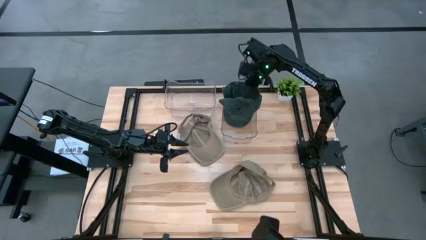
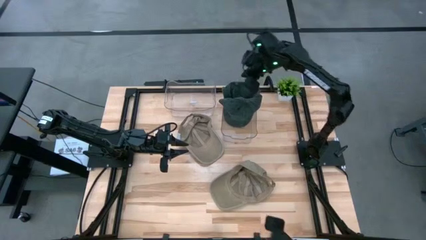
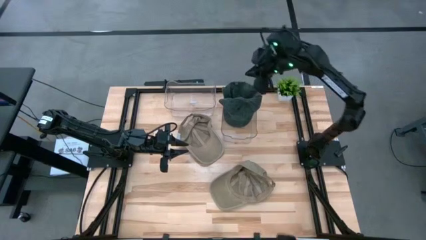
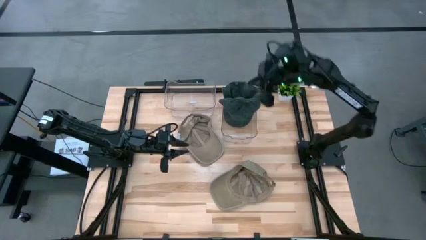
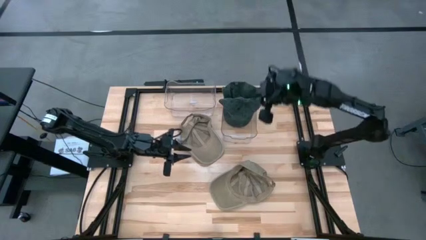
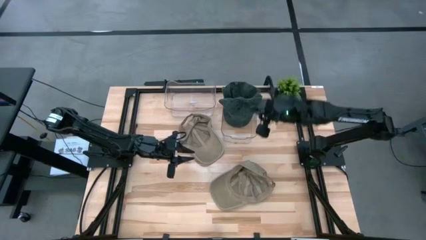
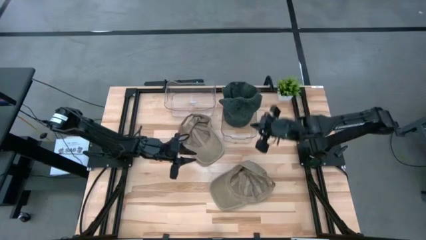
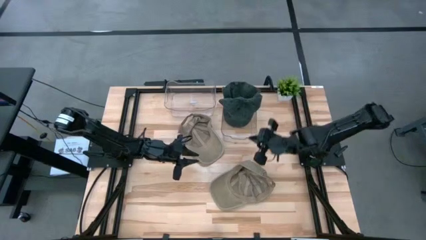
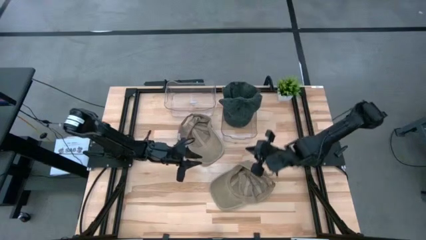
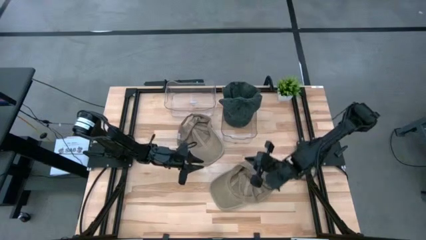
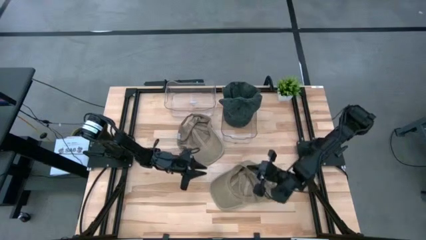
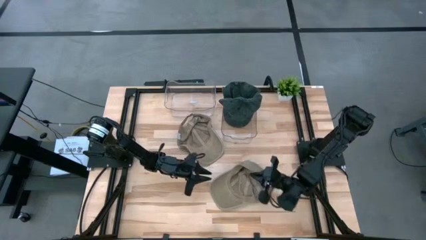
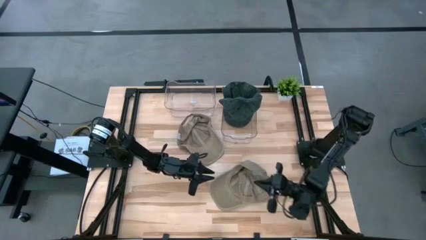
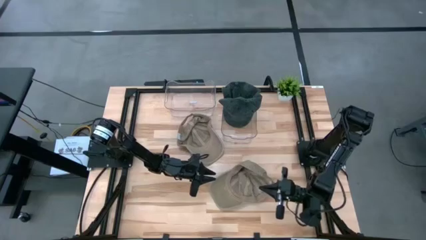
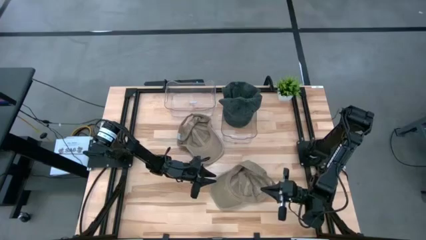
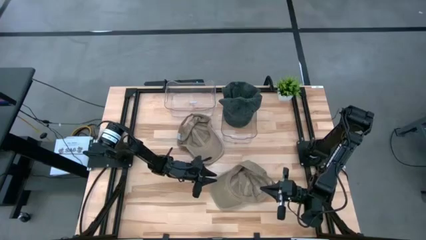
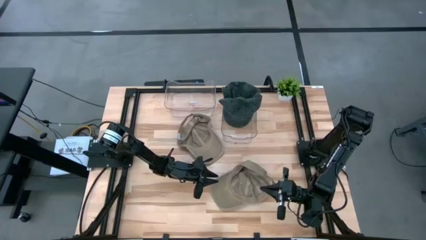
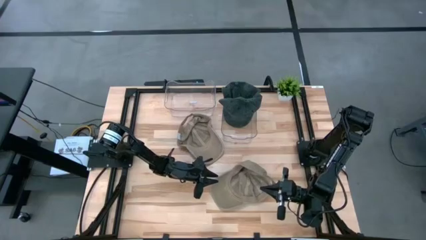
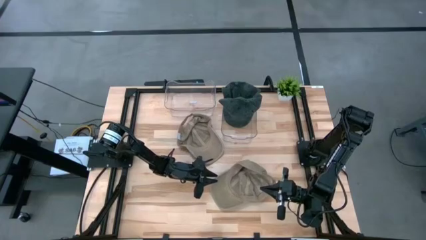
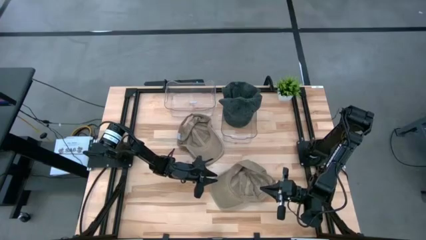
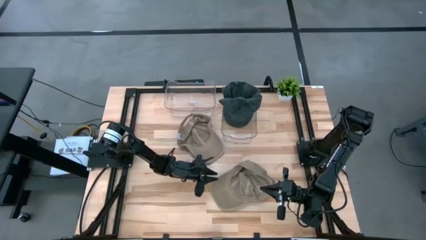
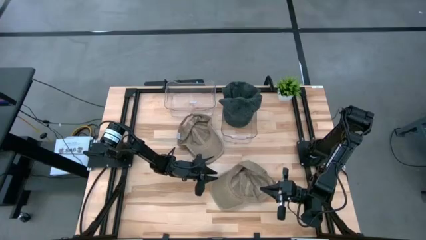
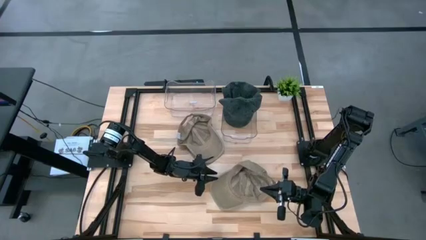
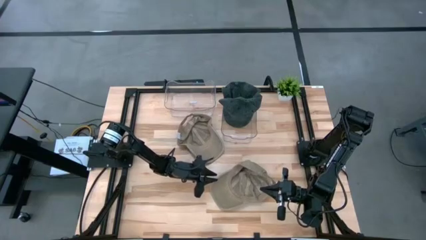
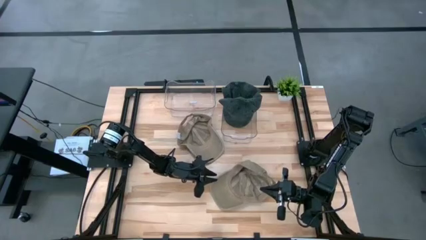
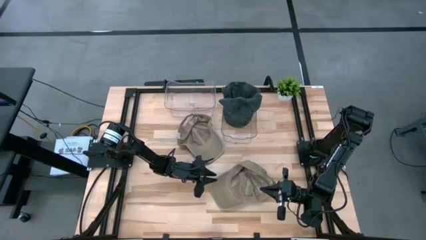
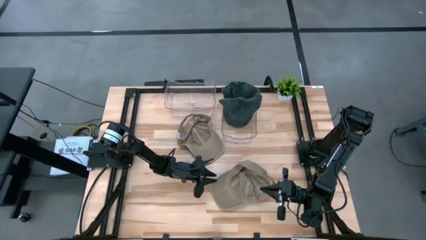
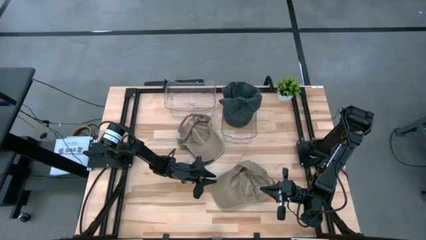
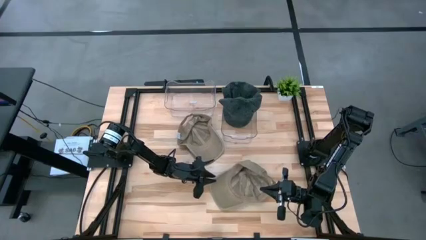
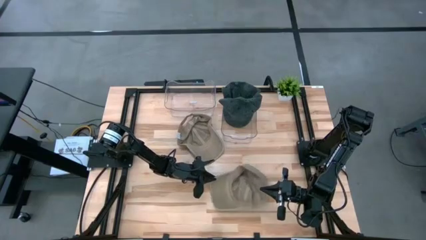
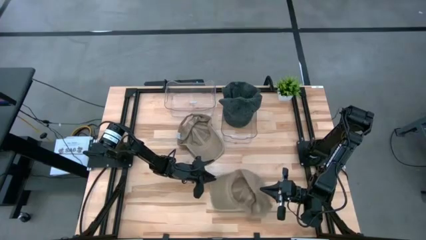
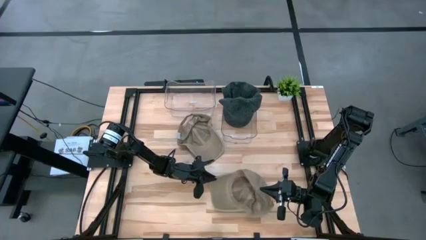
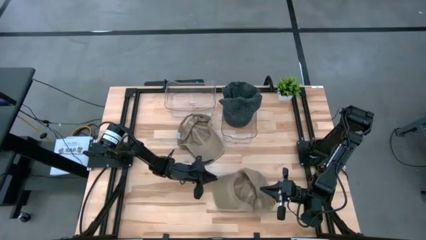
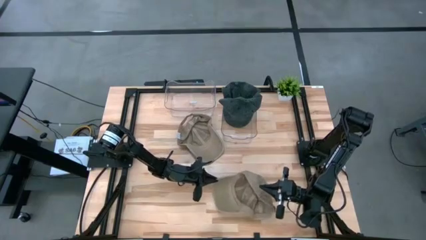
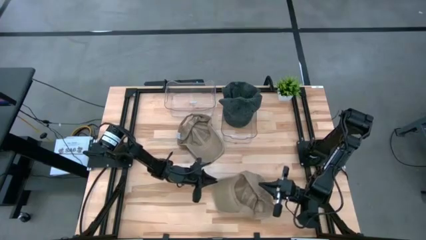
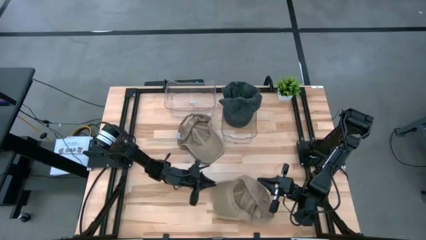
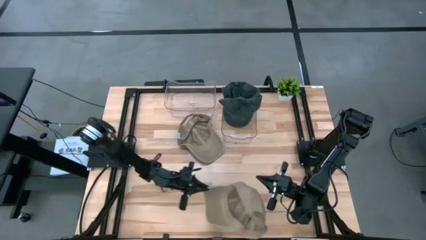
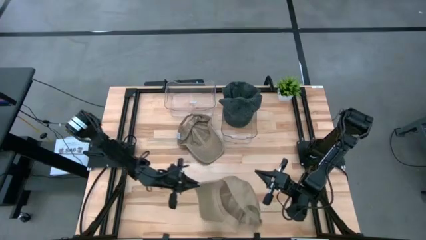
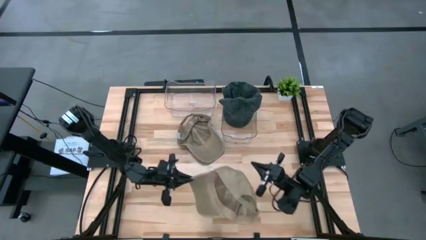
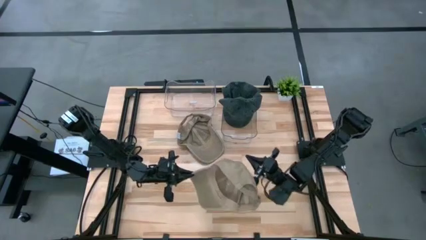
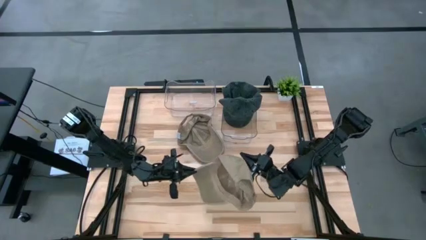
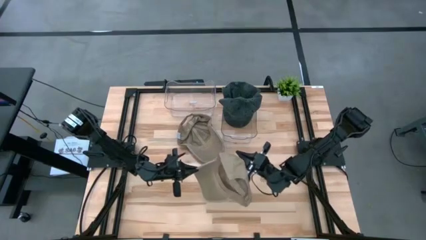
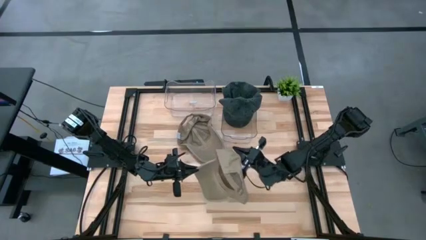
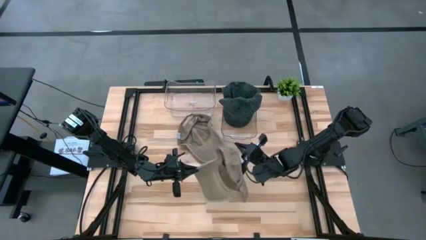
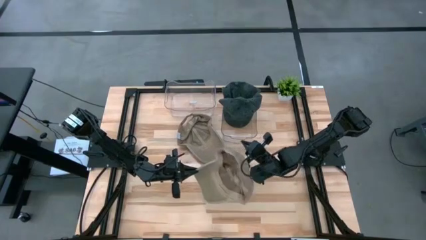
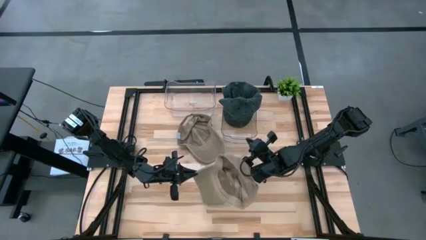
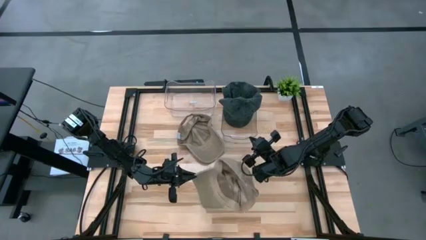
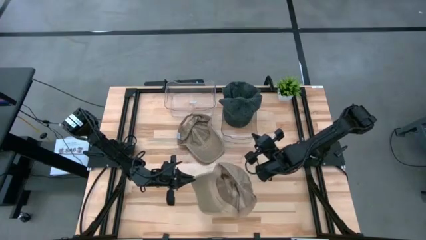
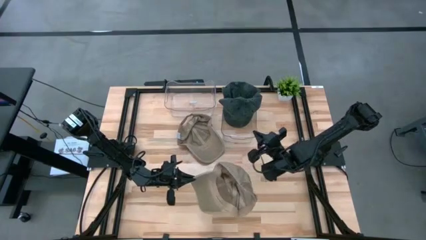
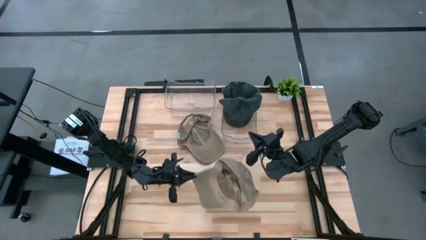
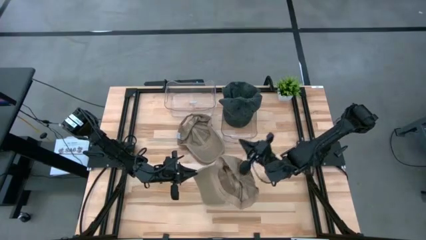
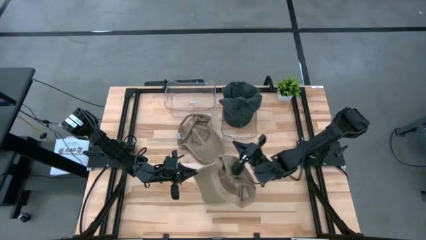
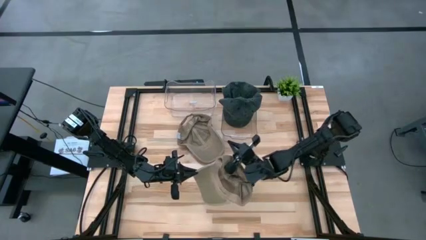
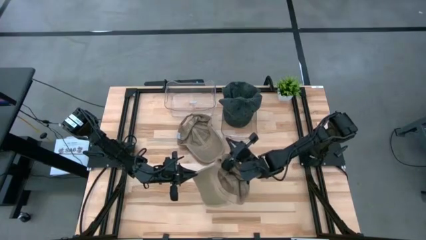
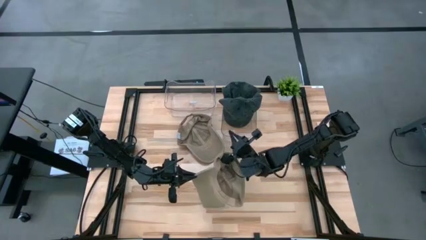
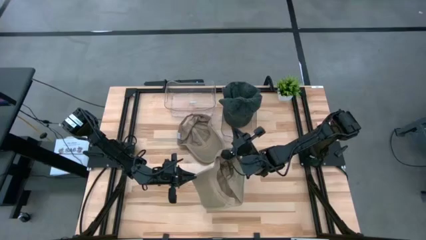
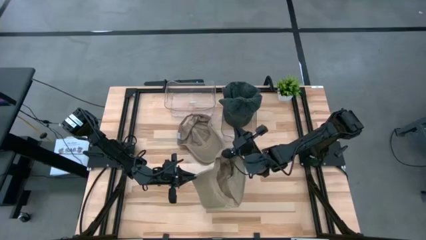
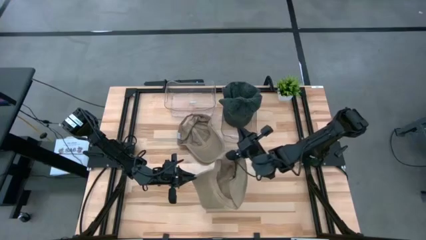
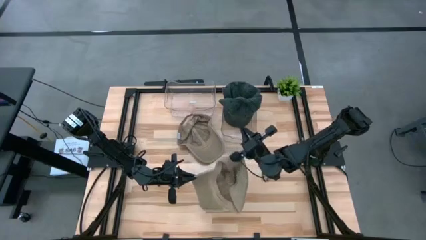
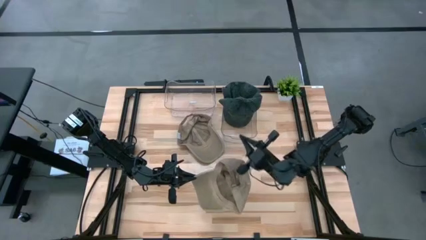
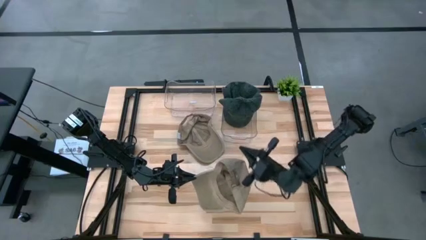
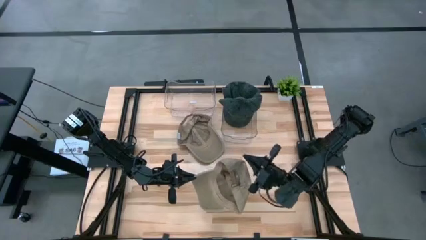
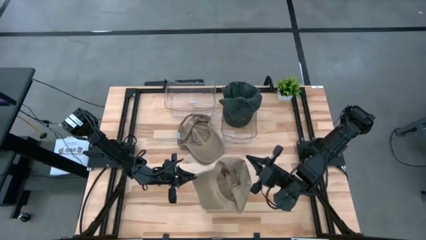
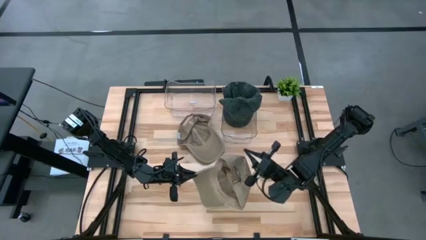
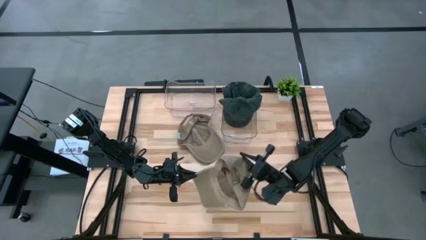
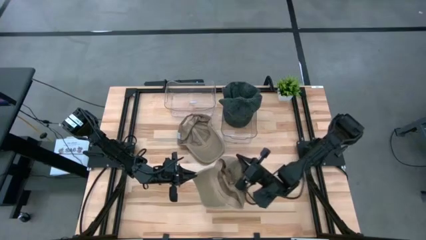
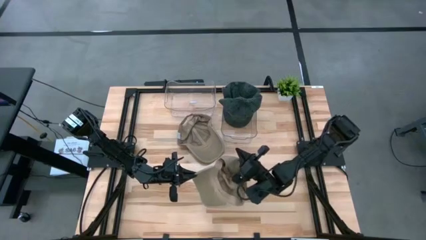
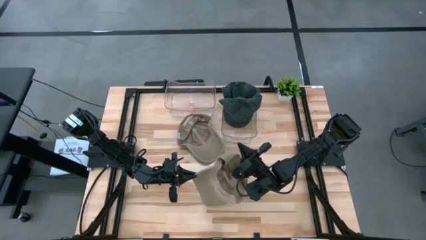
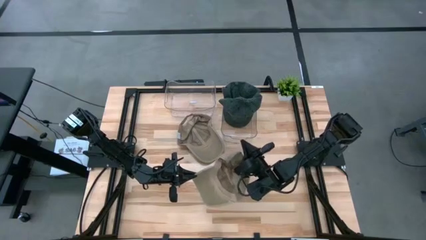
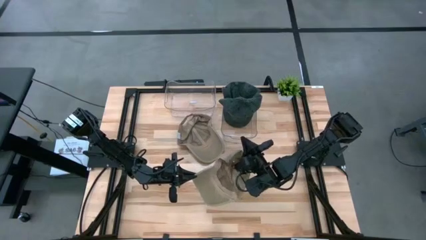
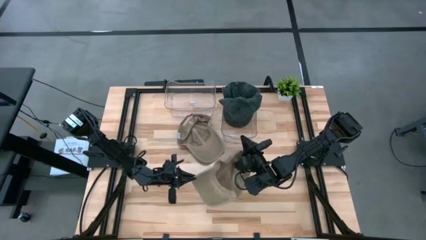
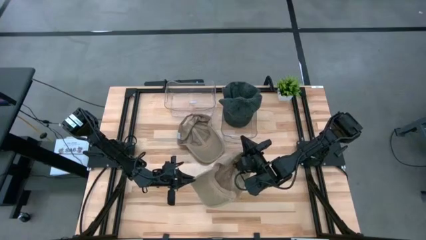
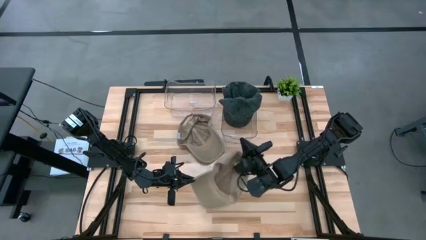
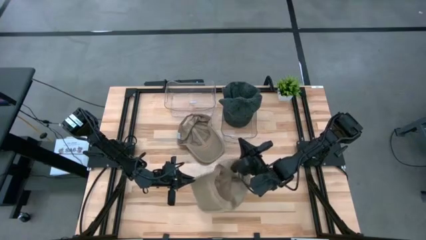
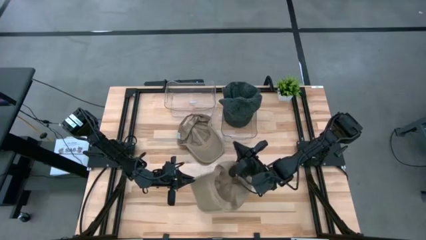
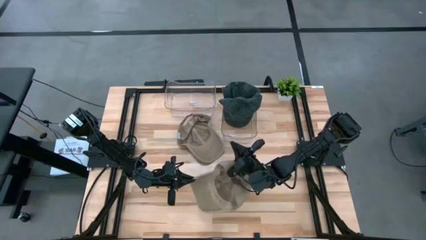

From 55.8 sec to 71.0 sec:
Task: Pick & Place hat
Put the bottom brown cap into the left transparent bin
